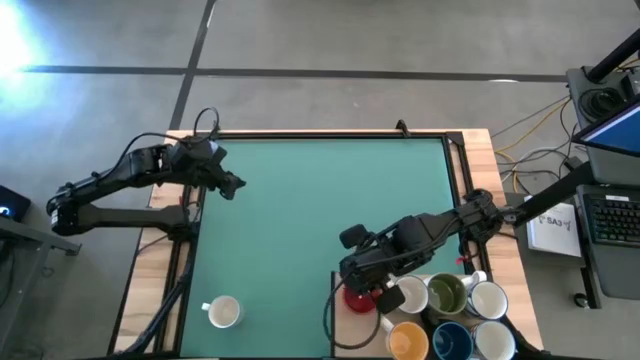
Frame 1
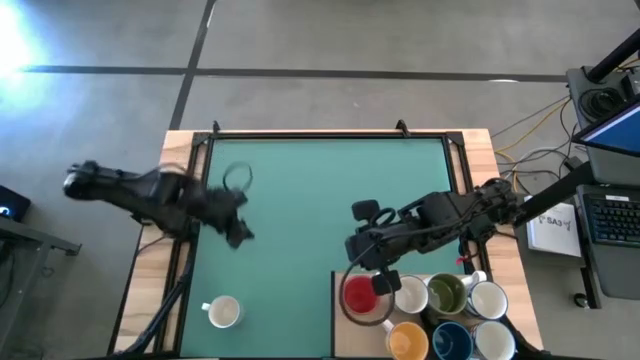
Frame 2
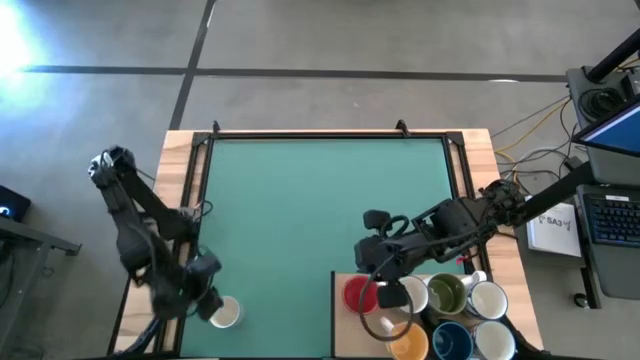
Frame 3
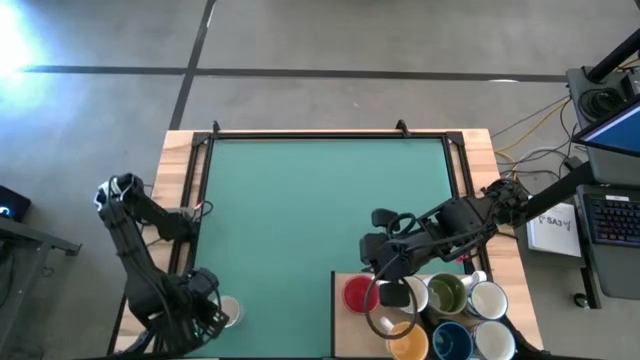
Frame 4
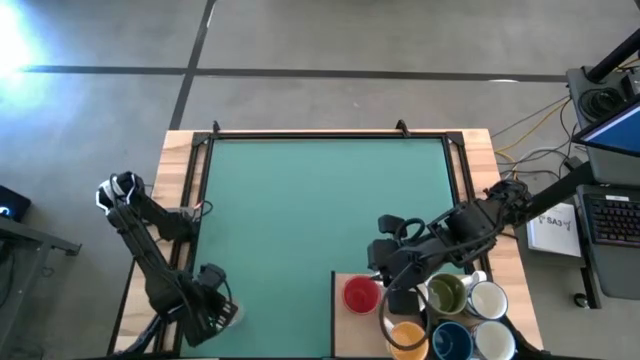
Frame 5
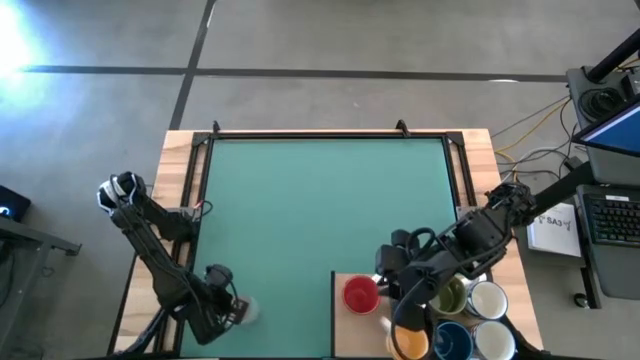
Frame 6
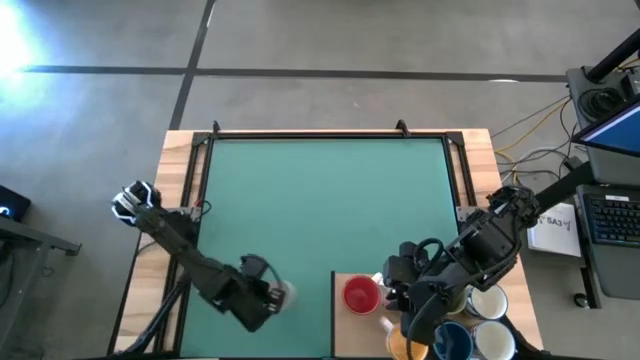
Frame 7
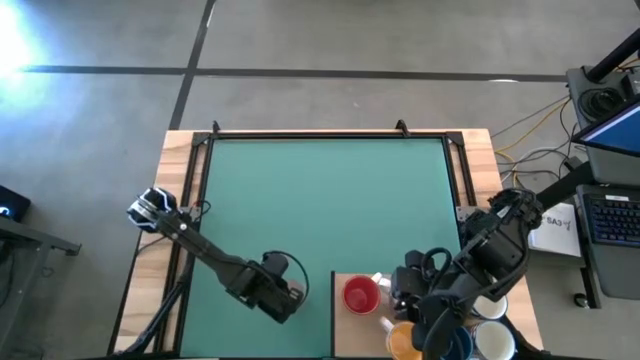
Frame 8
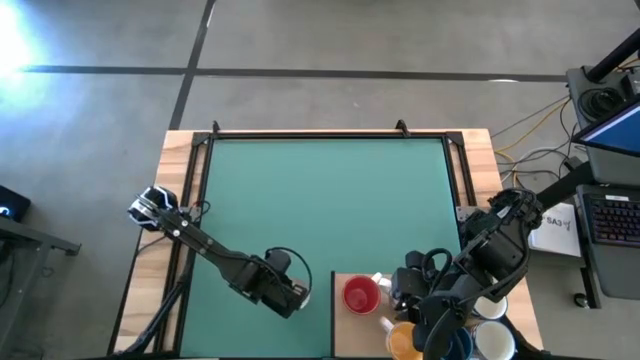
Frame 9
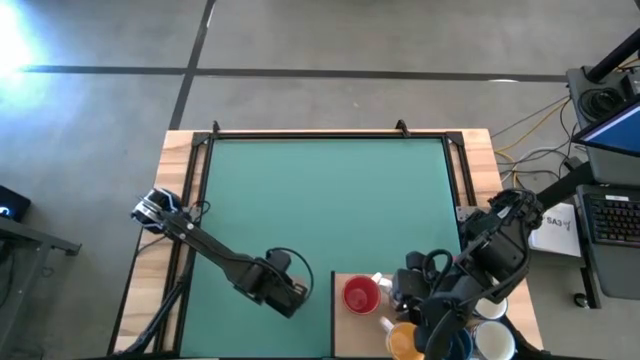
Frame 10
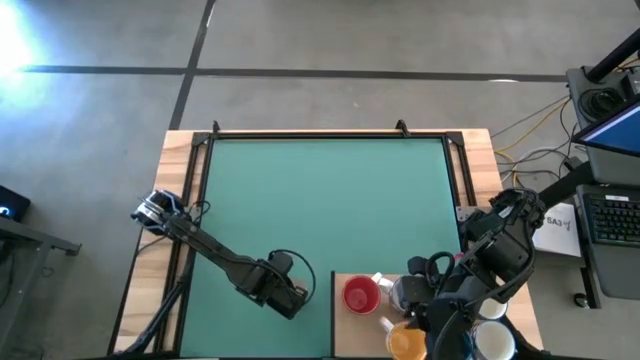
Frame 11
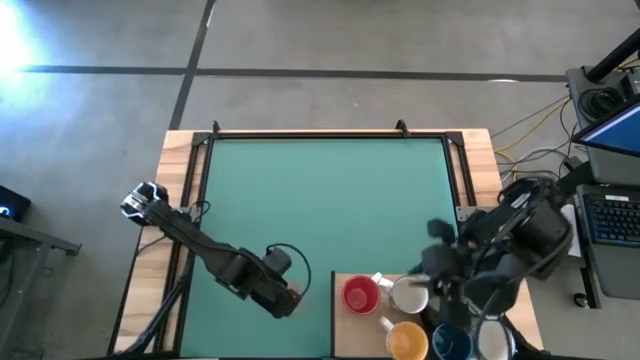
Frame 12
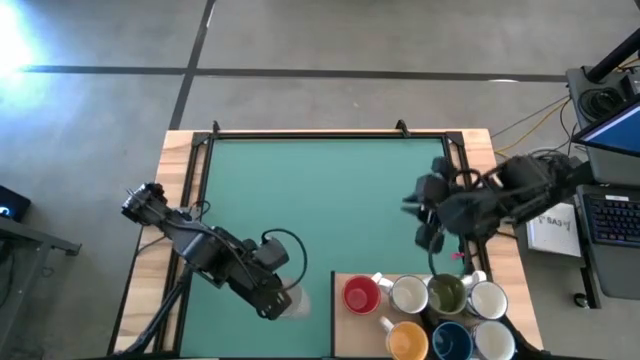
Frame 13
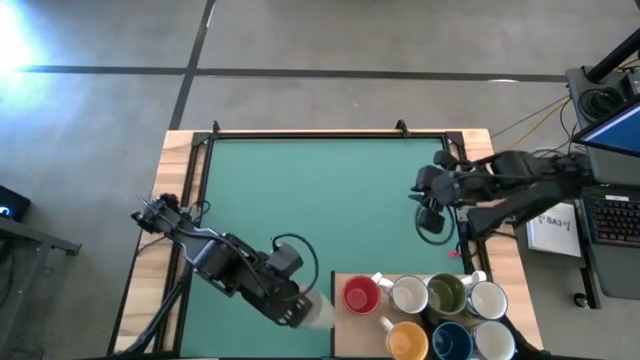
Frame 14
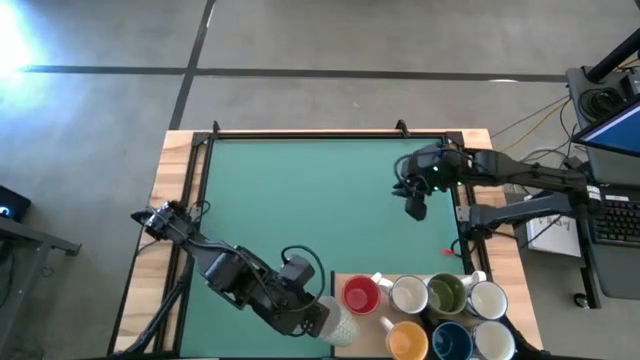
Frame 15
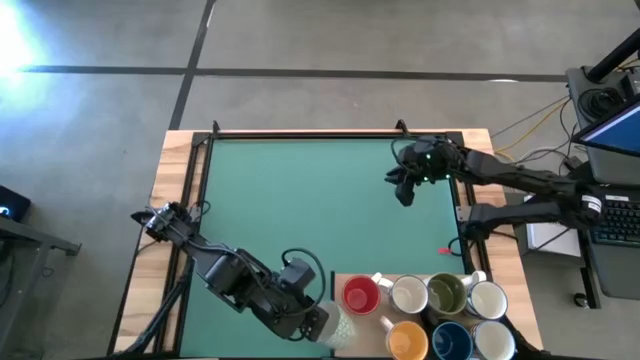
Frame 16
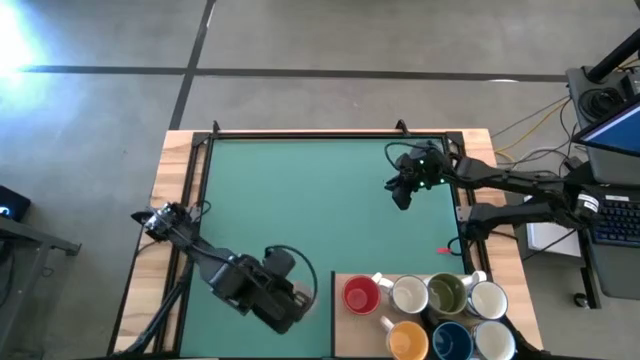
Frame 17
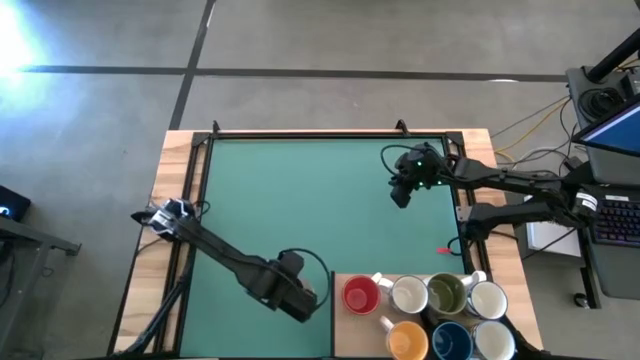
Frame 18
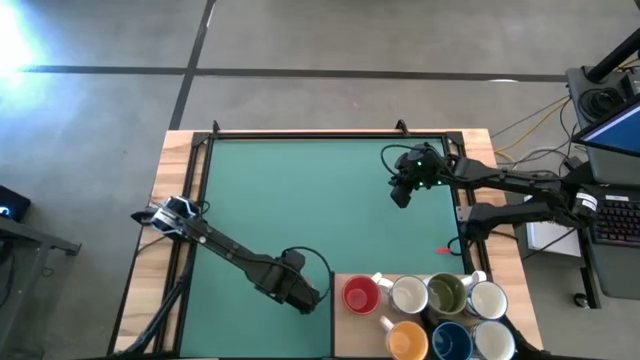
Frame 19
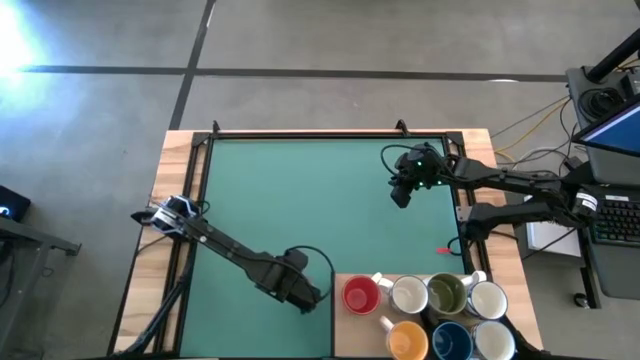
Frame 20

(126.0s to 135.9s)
Task: Place coffee mugs
Put the gray patterned mug on the shelf

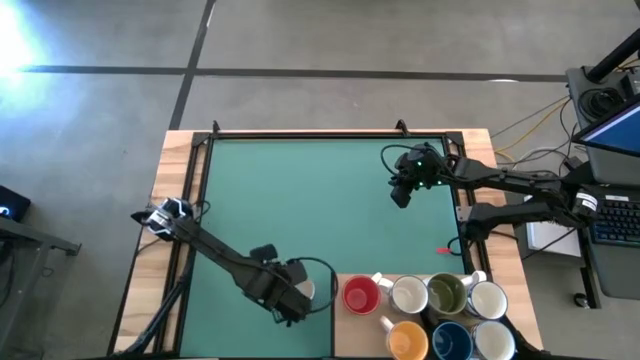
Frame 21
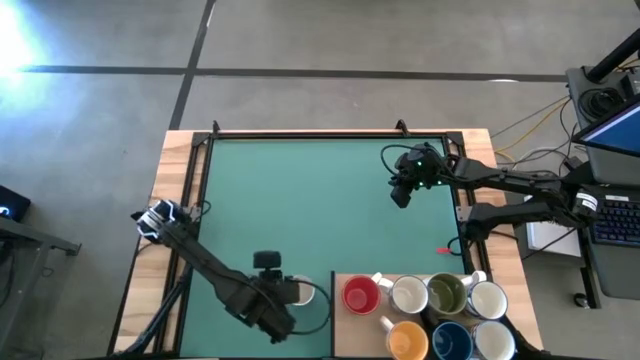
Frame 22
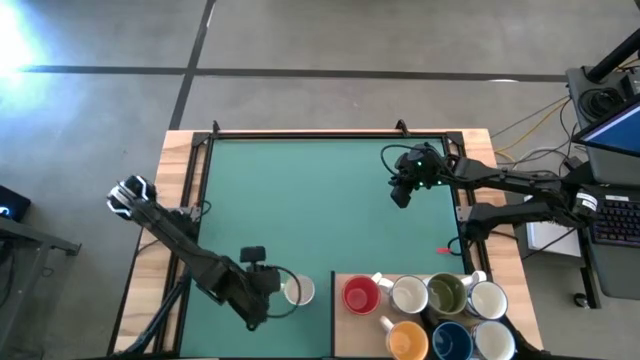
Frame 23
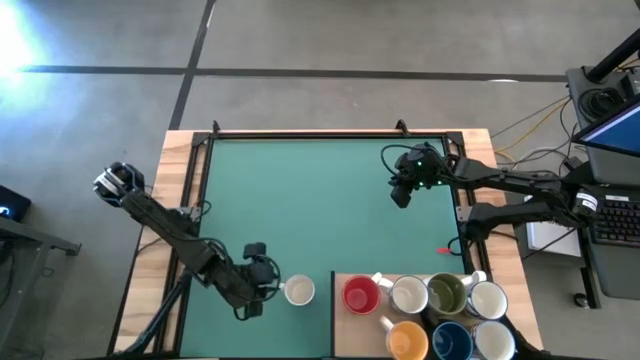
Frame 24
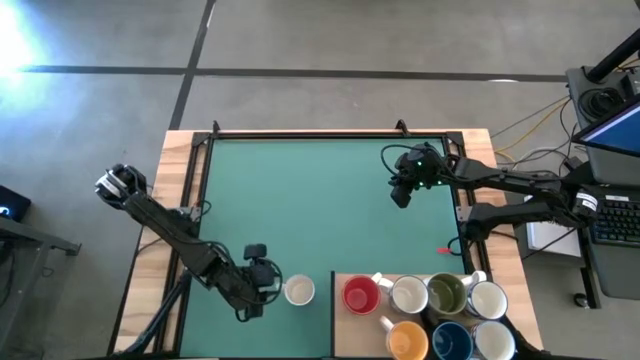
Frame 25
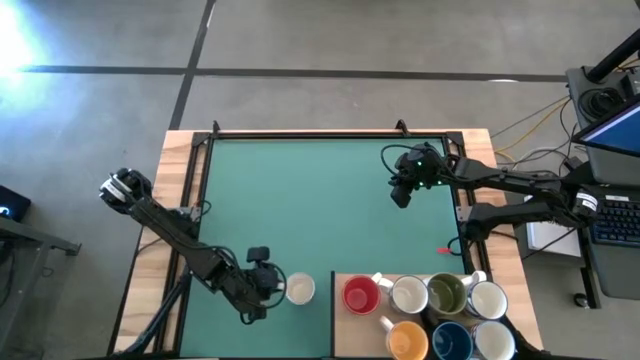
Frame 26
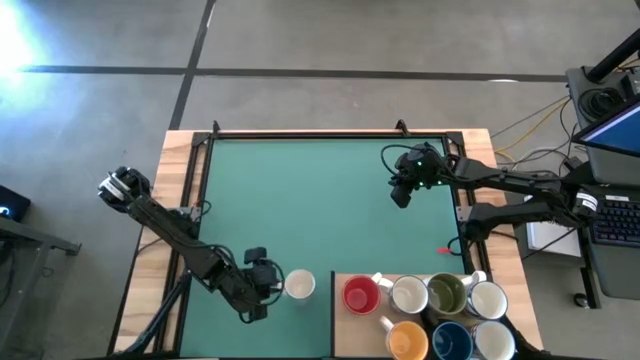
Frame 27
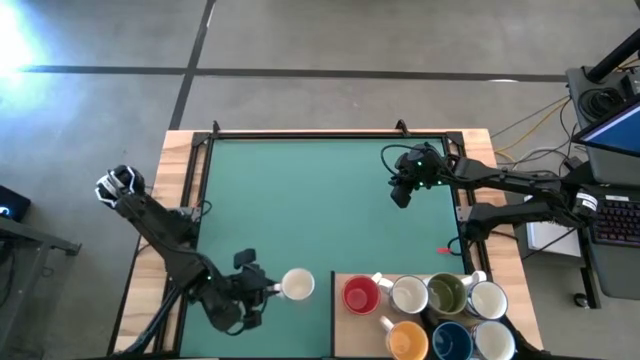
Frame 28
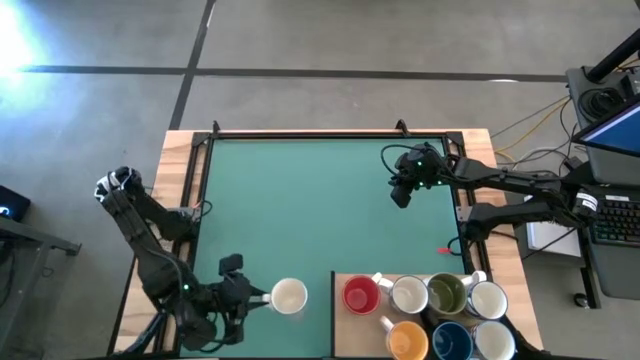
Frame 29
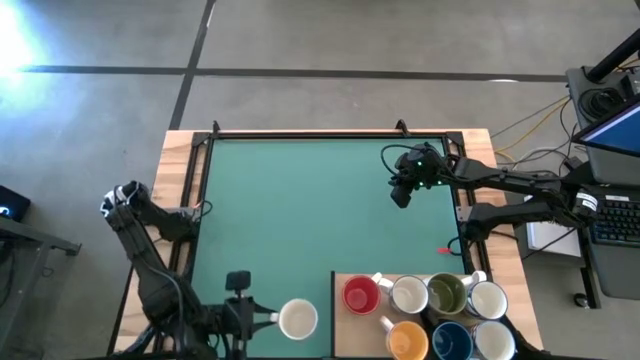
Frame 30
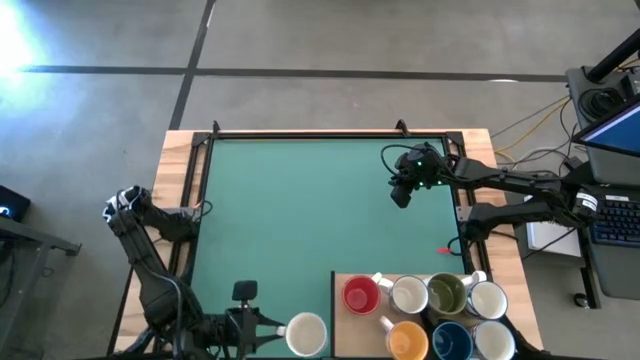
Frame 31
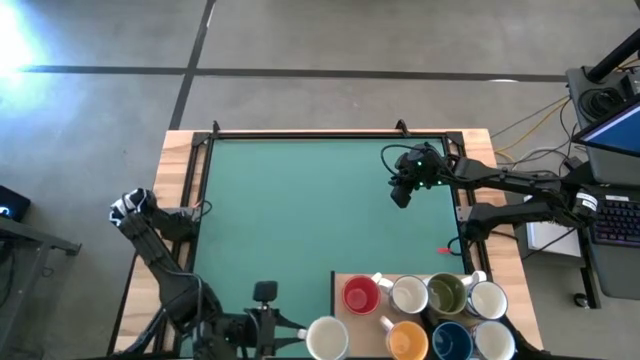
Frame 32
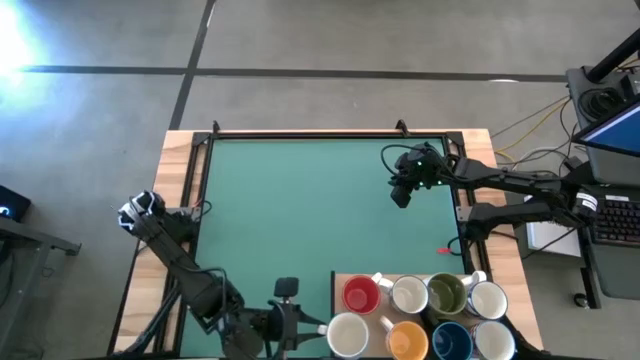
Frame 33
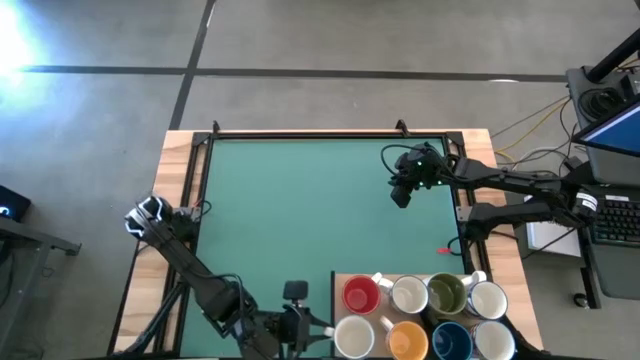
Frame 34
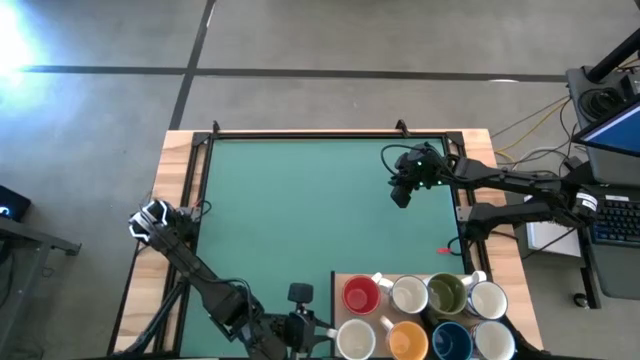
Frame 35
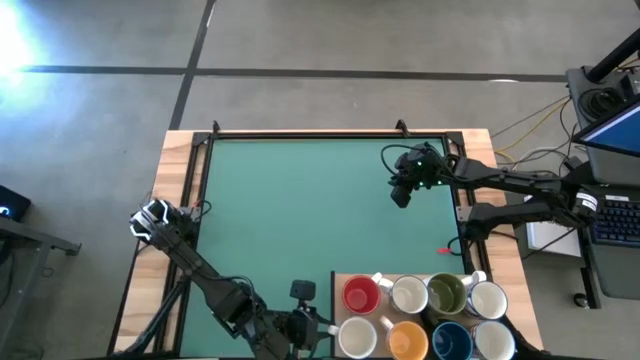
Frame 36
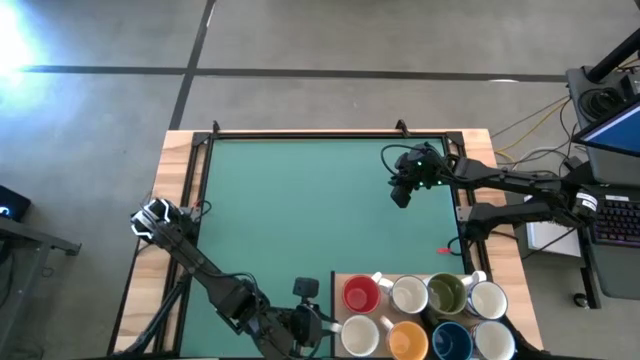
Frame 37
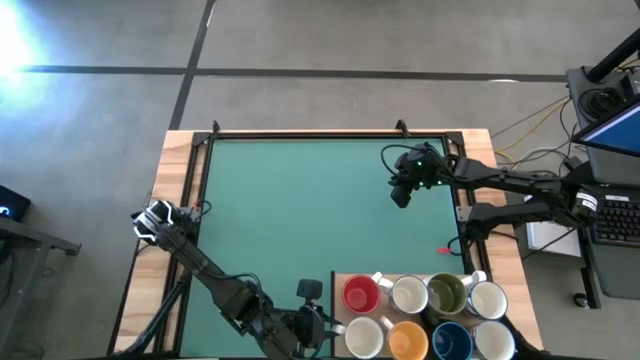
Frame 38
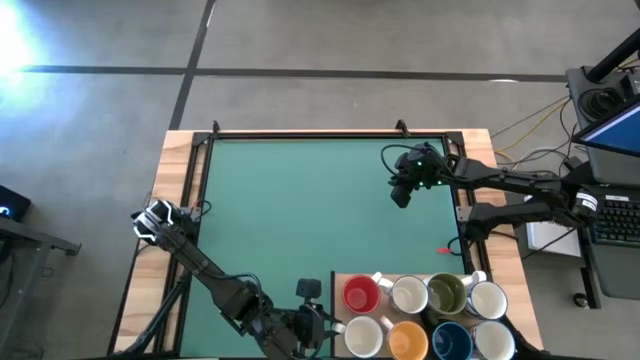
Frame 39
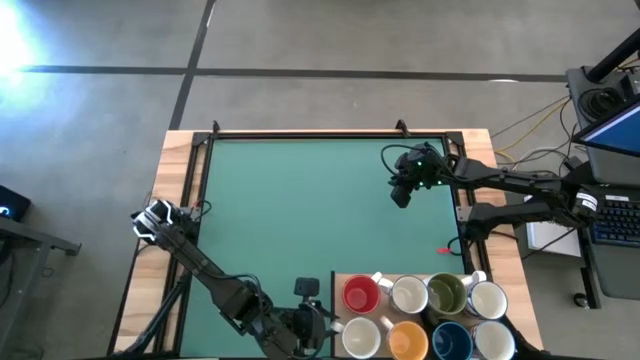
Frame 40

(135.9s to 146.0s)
Put the gray patterned mug on the shelf
